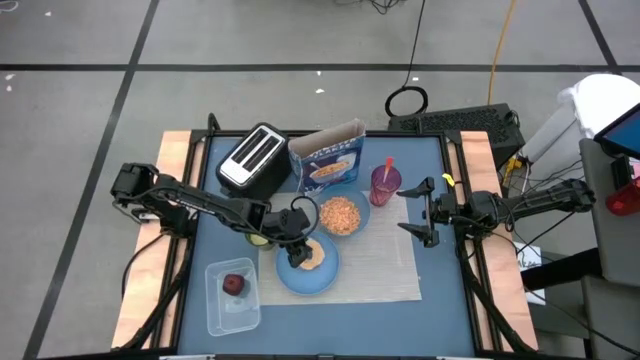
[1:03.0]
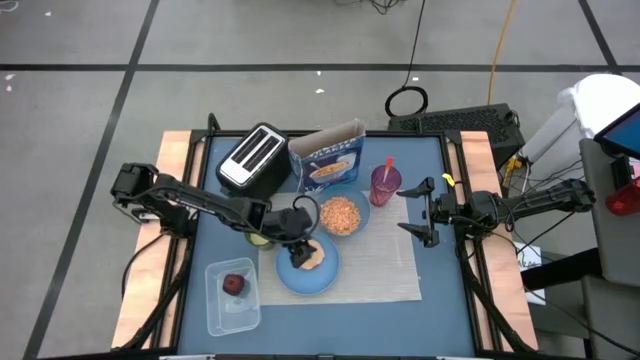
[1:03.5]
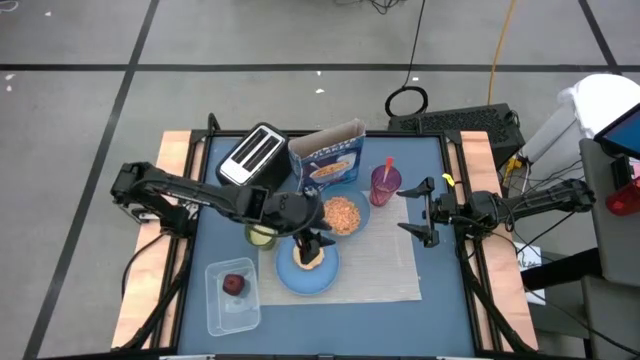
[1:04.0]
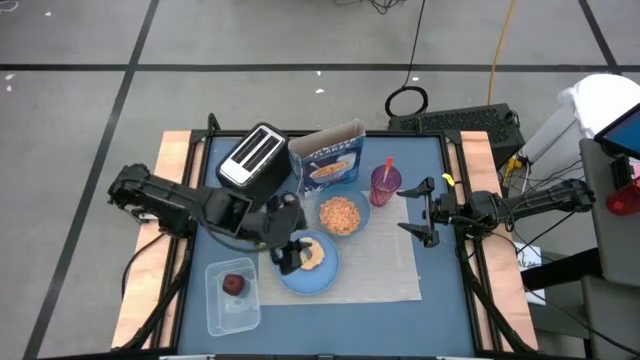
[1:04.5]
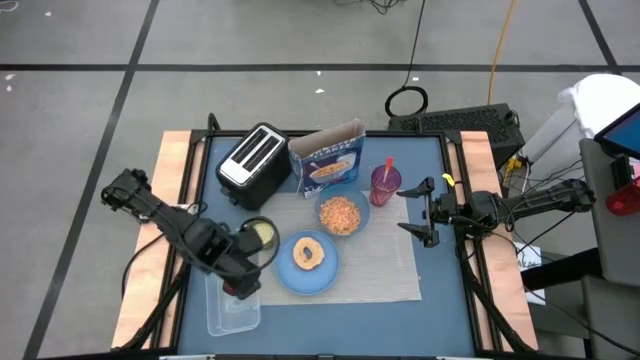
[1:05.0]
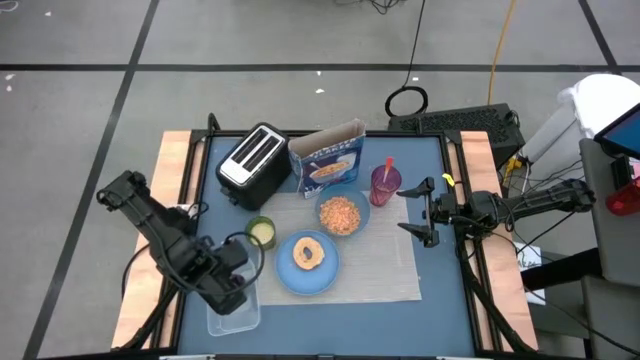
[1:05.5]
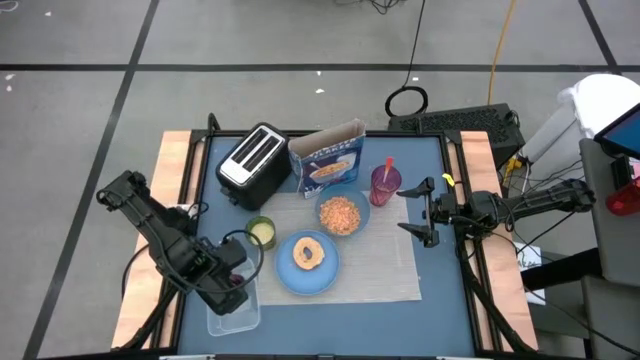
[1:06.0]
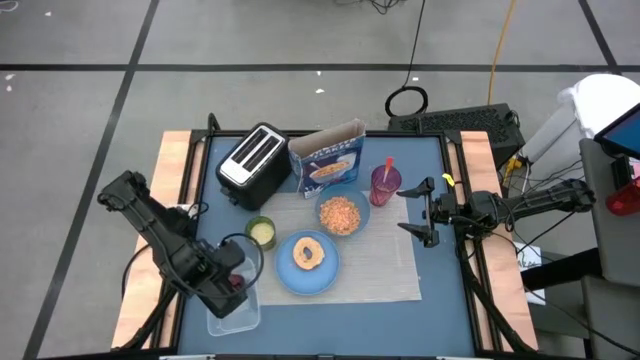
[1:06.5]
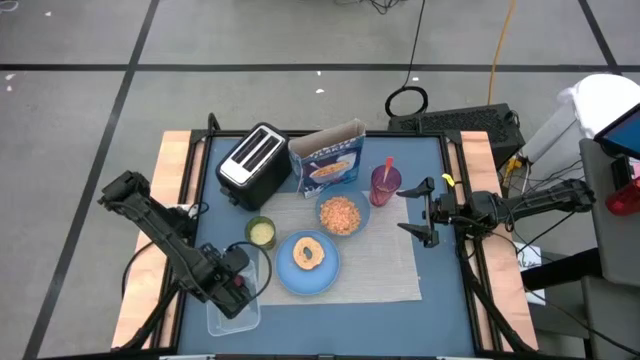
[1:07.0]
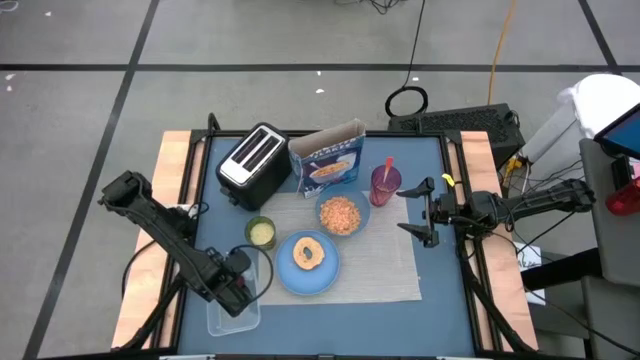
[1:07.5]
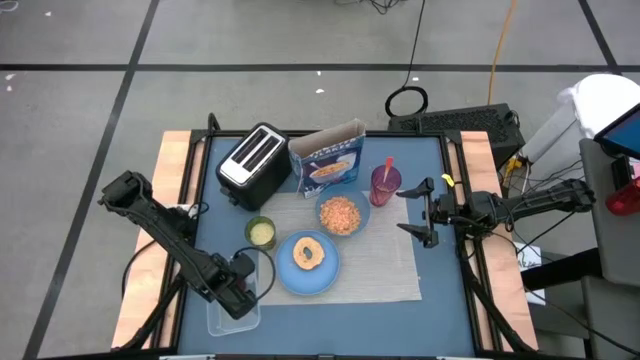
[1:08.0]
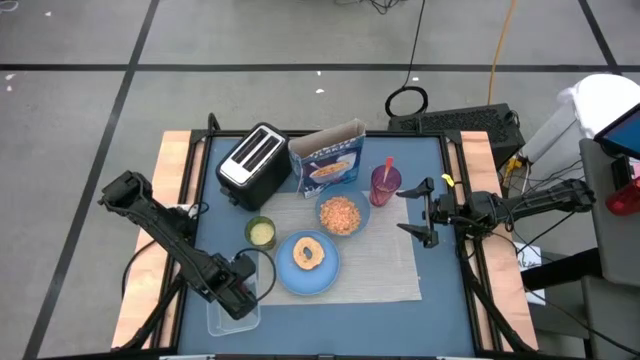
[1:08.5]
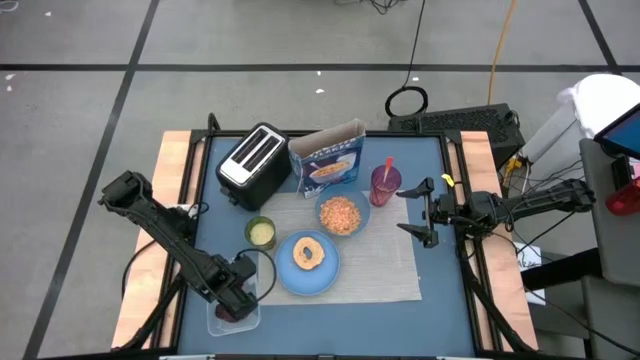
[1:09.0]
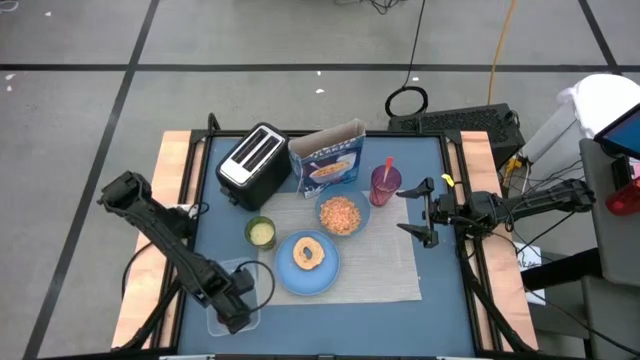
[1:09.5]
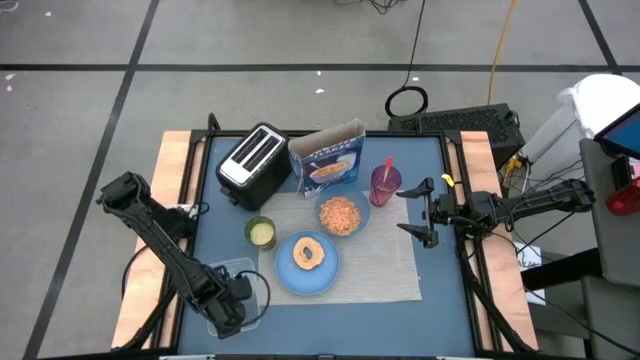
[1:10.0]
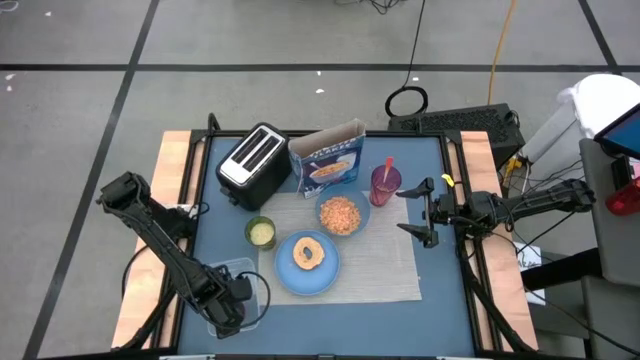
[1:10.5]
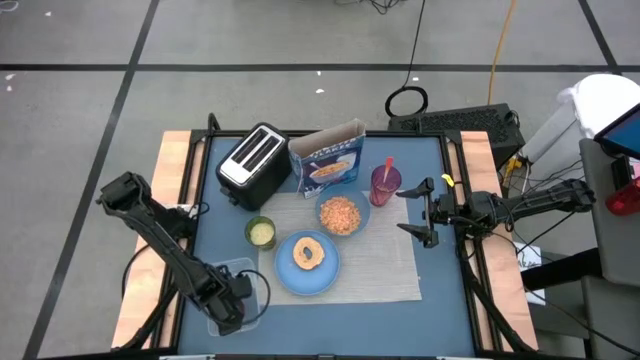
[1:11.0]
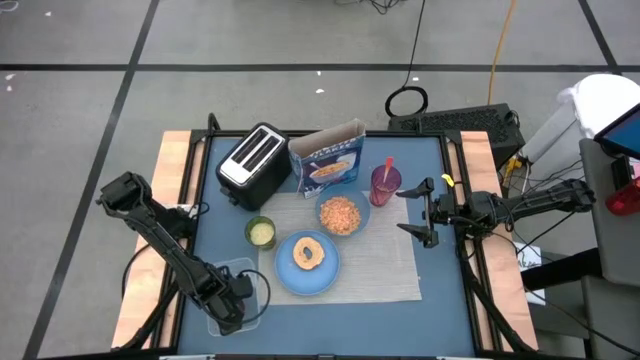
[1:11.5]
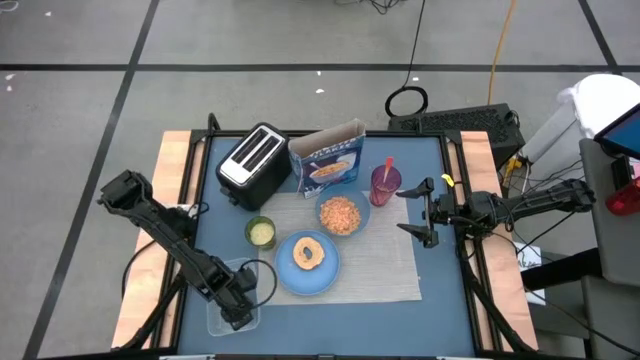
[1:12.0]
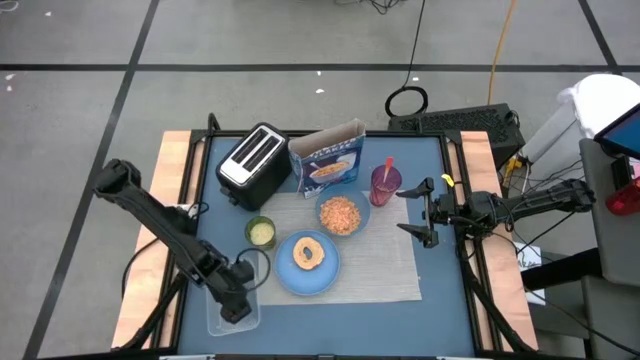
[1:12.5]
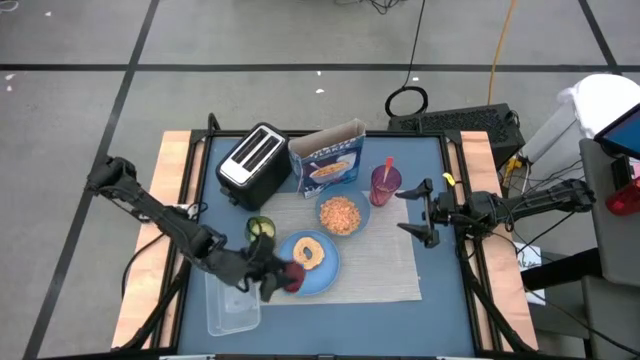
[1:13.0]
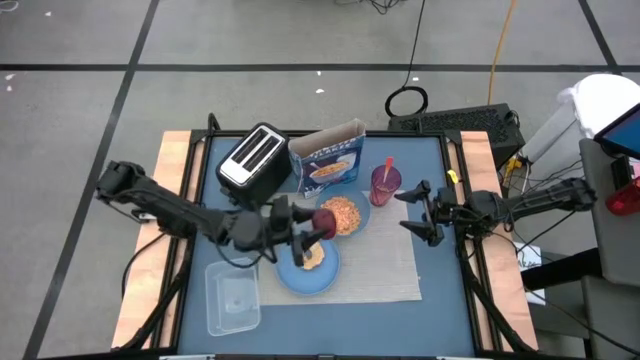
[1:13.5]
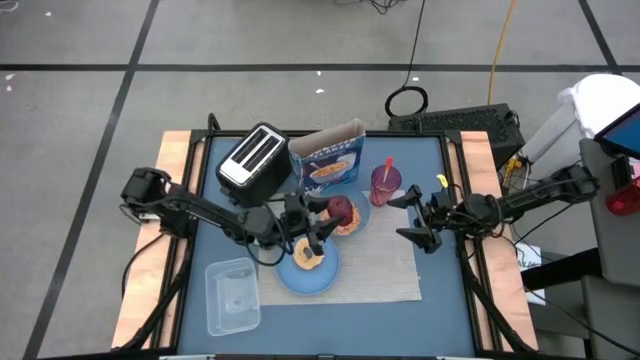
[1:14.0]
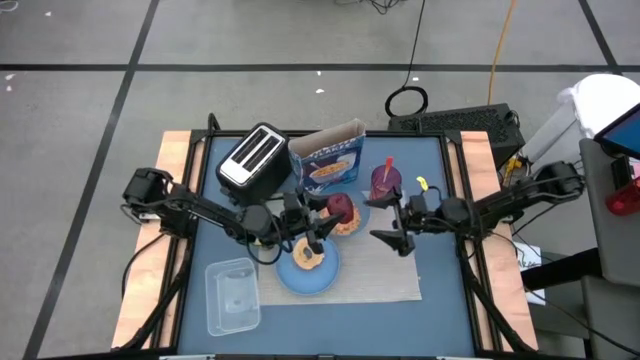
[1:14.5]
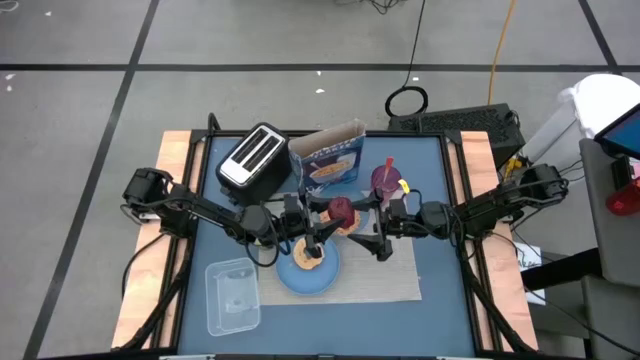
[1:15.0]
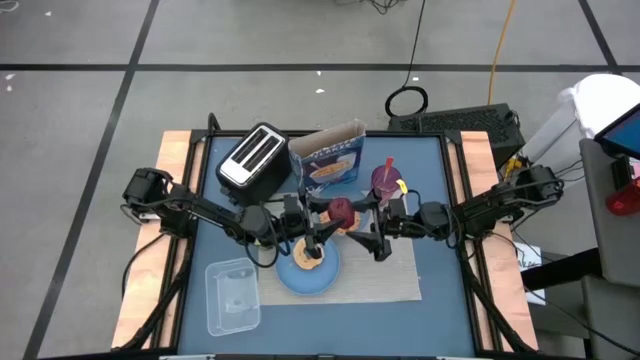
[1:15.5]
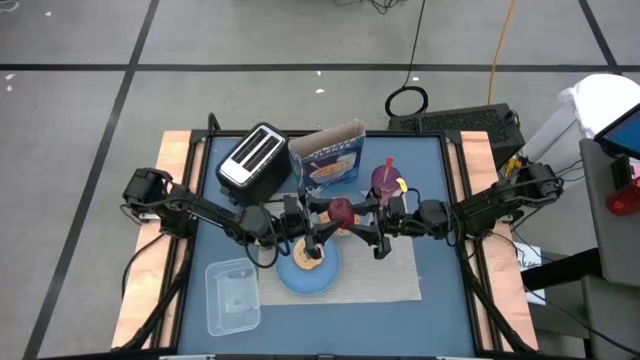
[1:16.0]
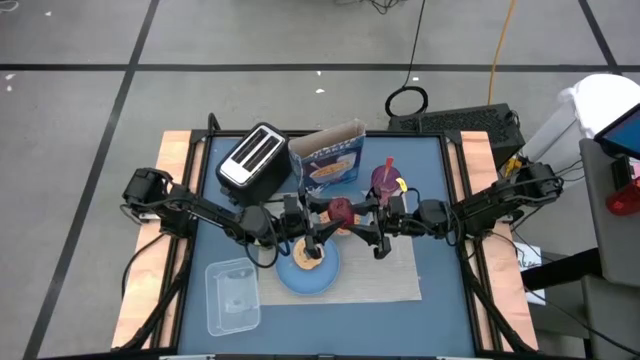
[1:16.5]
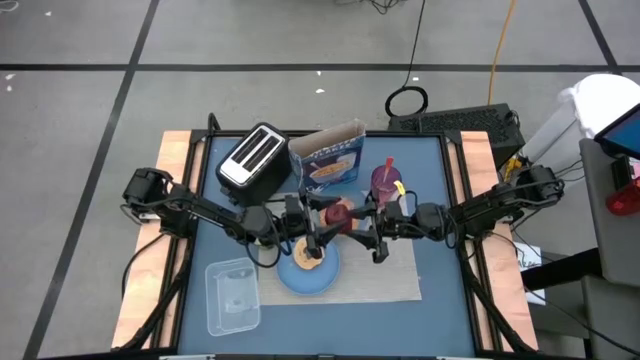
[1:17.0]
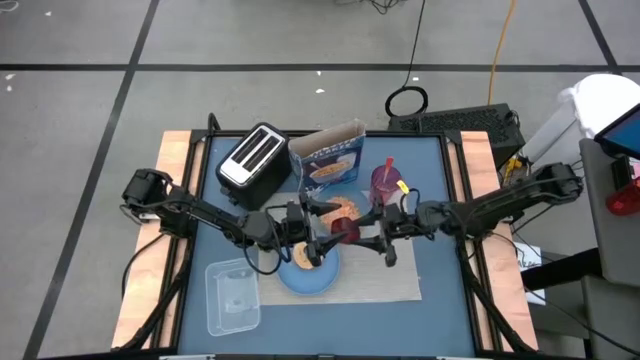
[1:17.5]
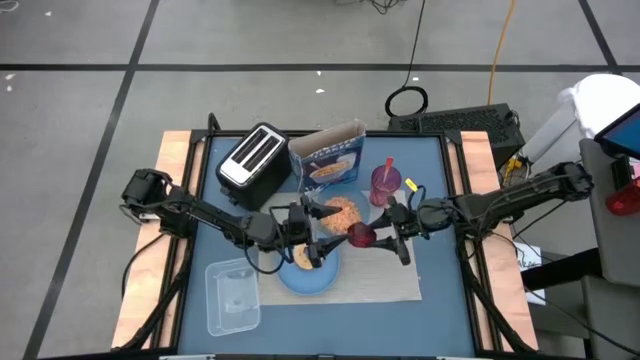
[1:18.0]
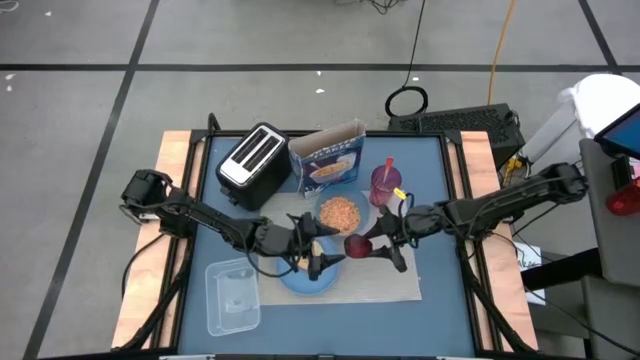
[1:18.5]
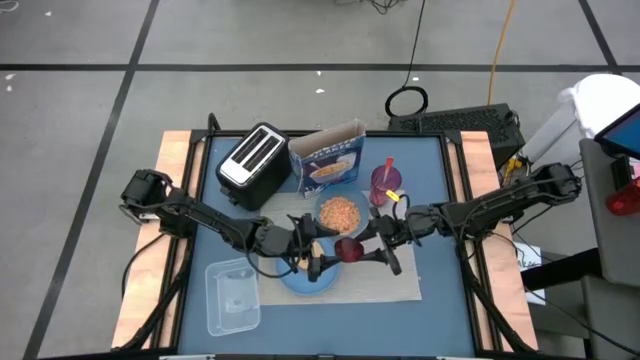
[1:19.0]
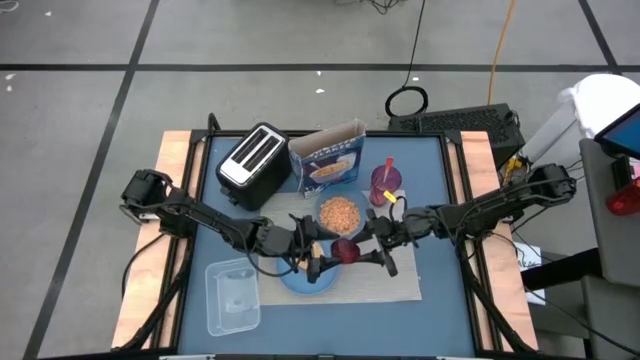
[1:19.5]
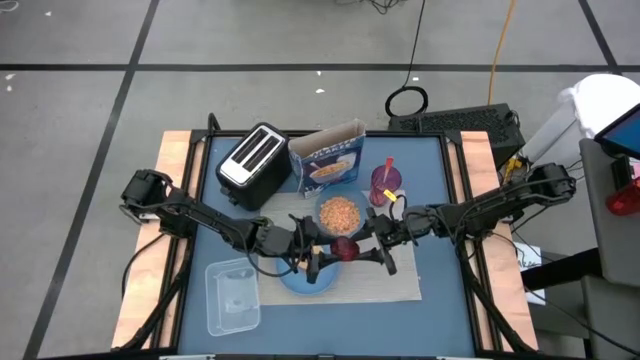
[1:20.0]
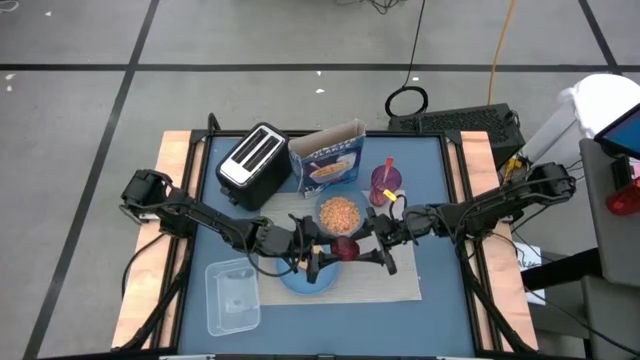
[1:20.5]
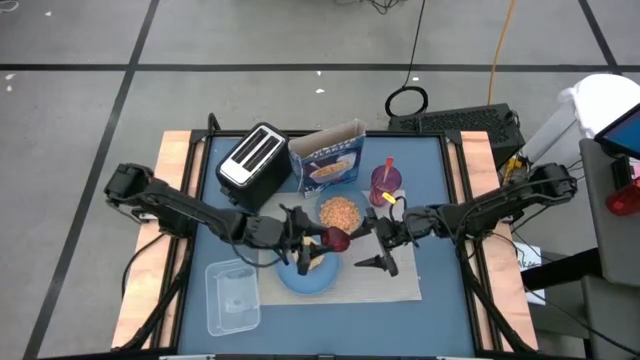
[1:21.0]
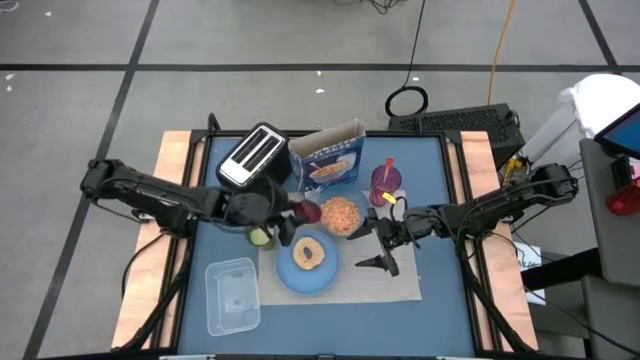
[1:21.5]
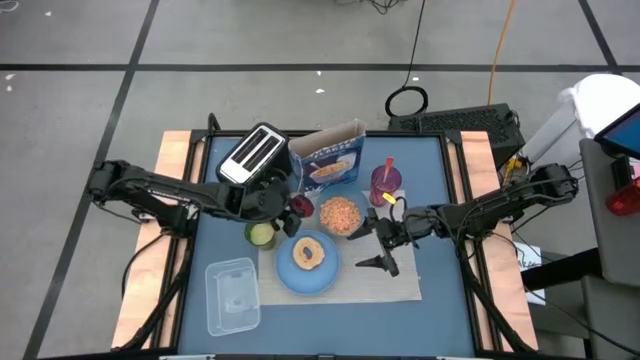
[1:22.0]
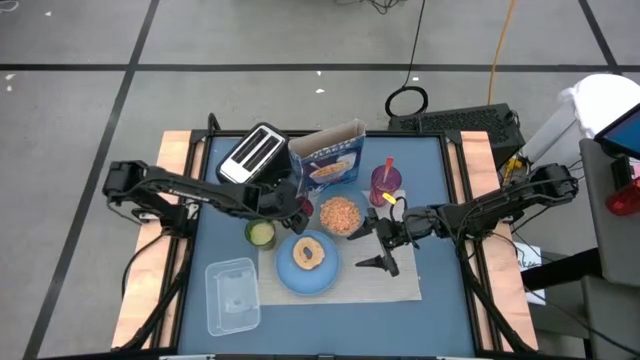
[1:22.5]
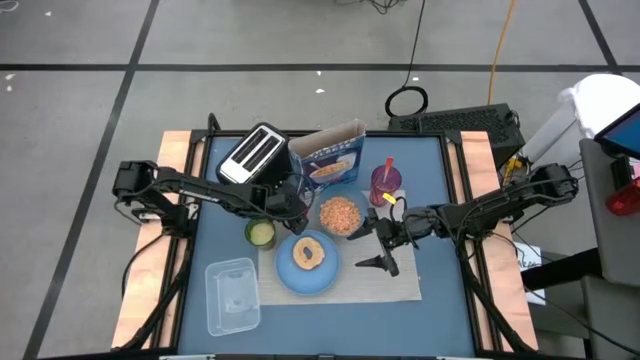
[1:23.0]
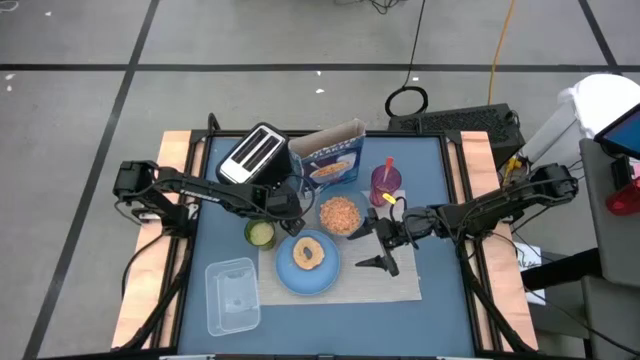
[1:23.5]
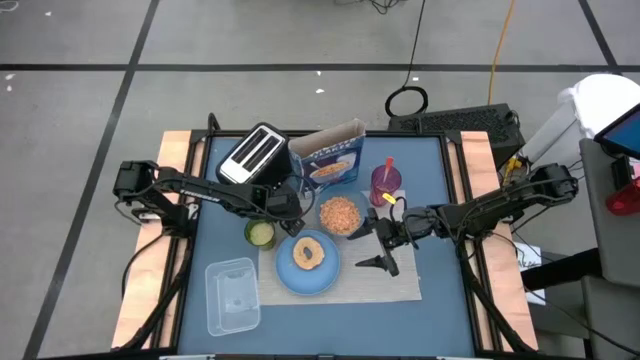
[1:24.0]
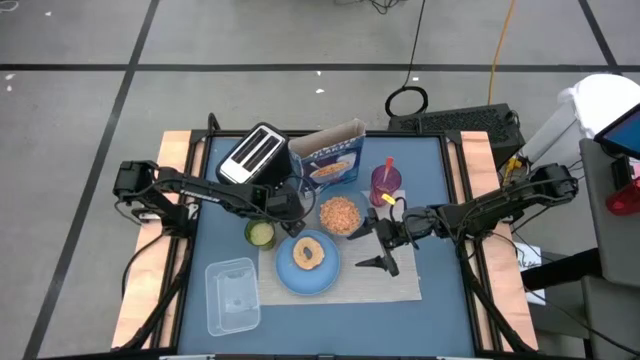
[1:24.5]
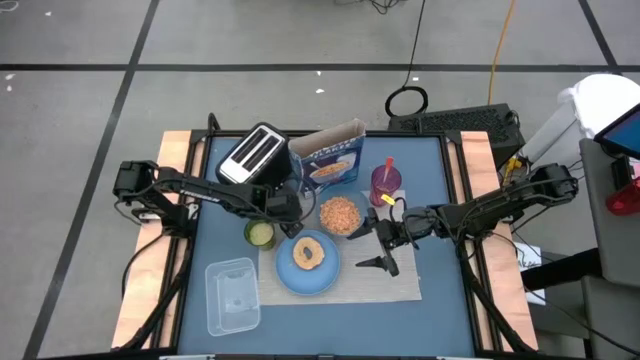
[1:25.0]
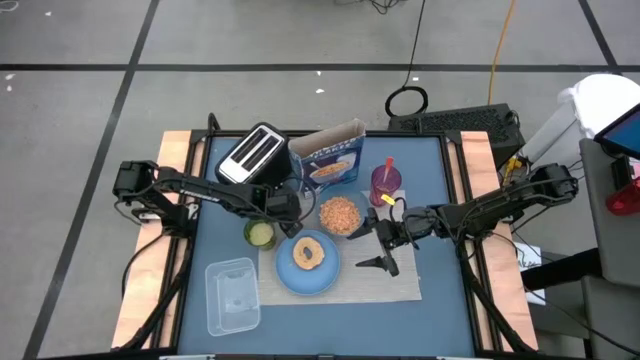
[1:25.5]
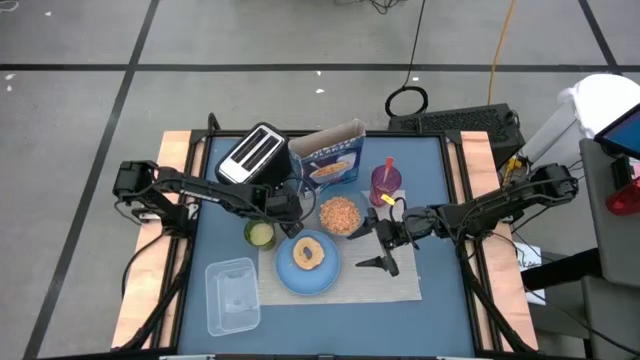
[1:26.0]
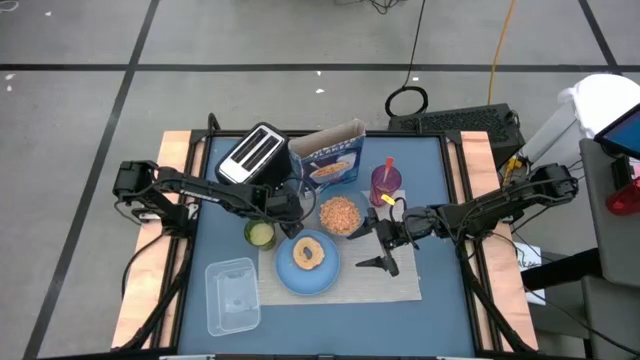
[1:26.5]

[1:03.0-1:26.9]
Task: Arrange a breakfast setting
Put the apple on the top left of the gray placemat
